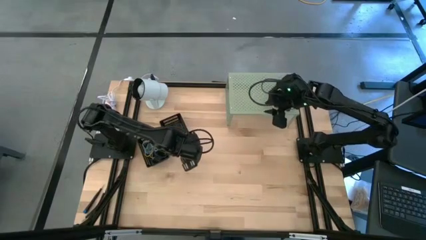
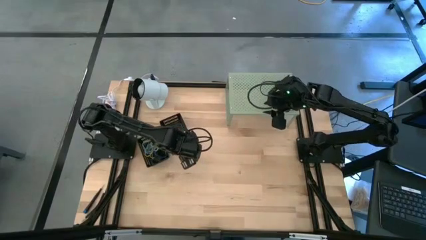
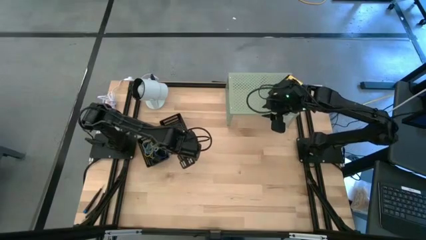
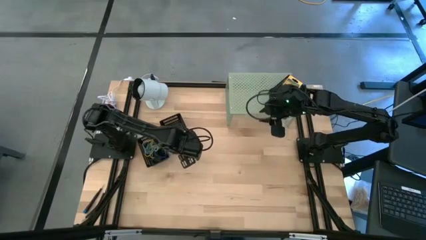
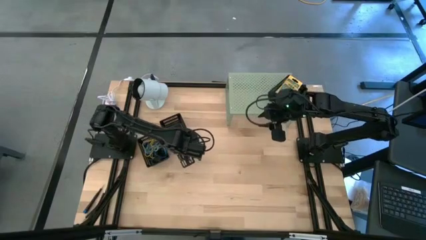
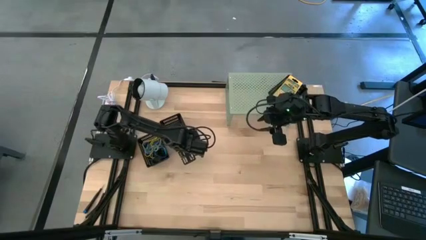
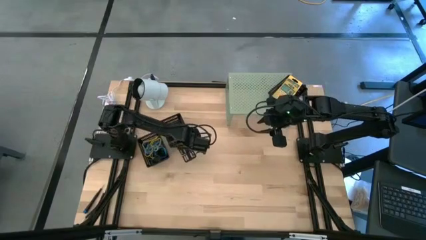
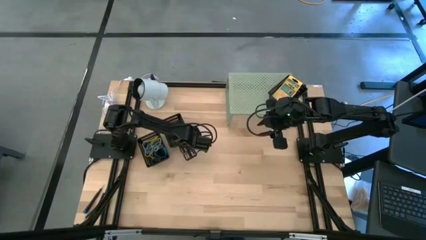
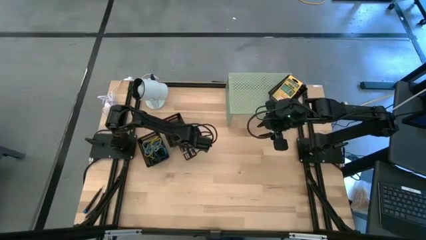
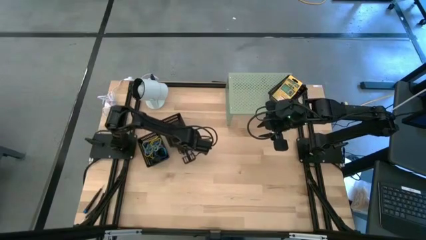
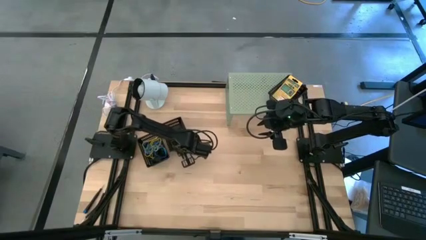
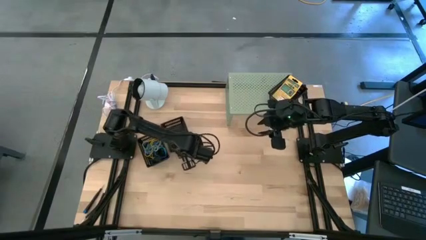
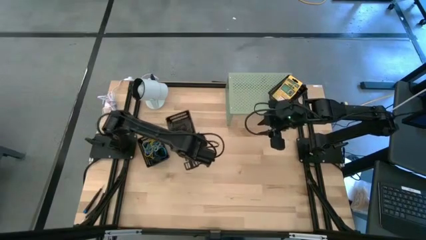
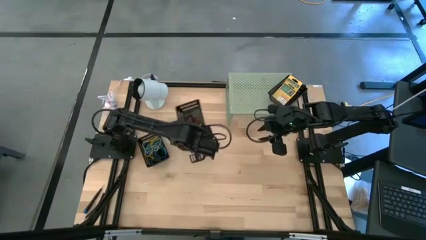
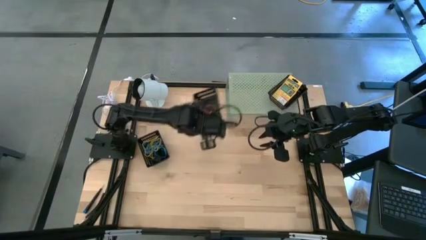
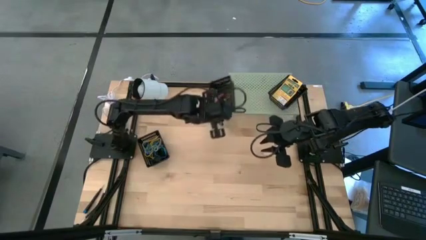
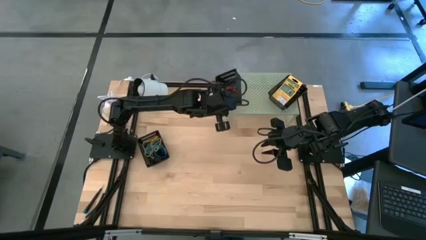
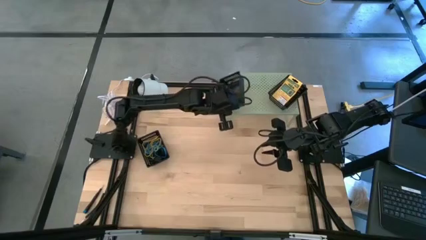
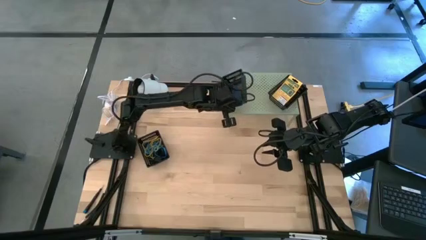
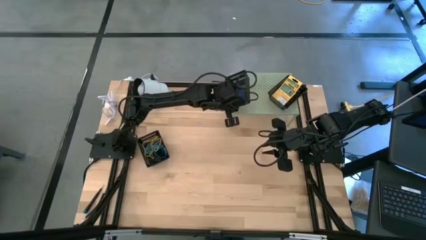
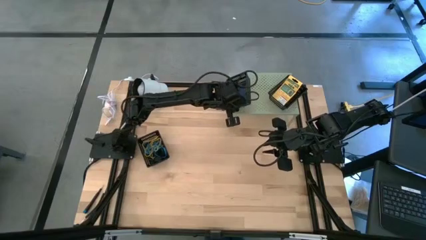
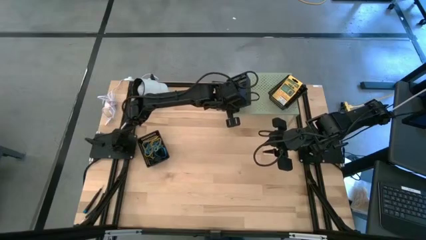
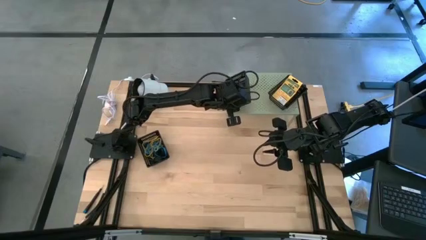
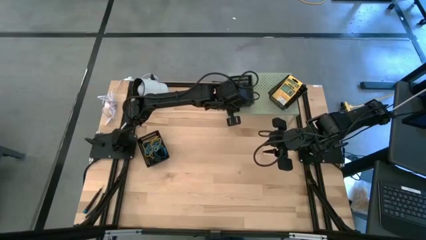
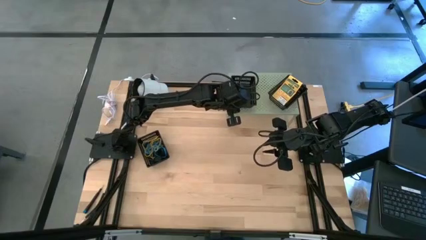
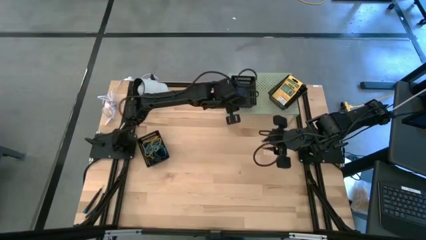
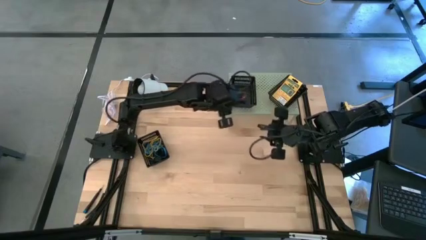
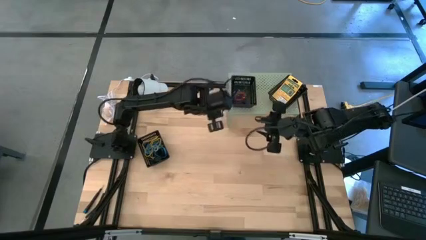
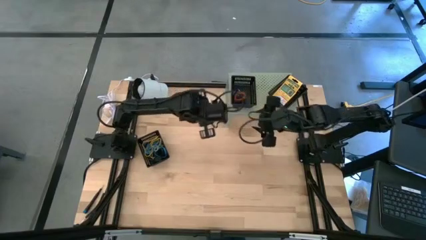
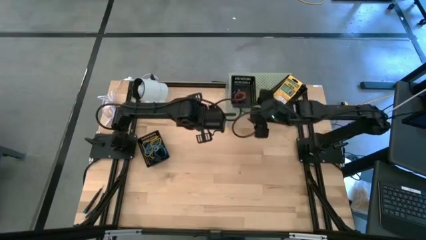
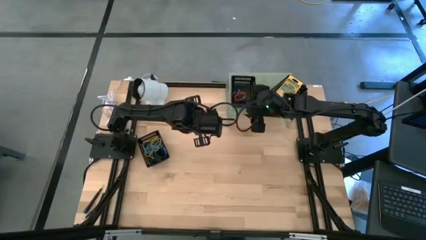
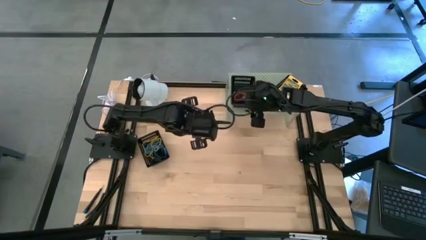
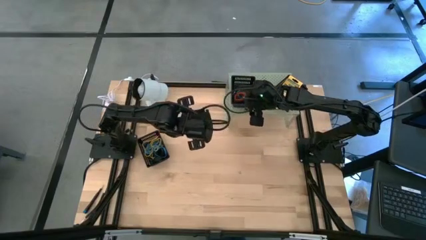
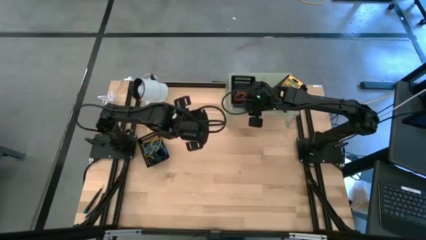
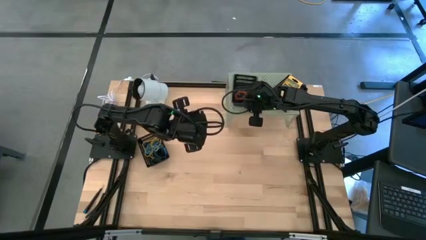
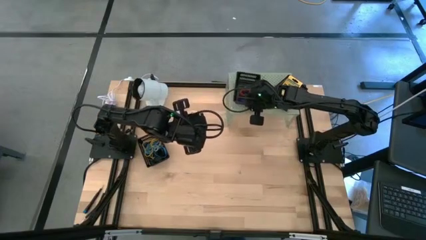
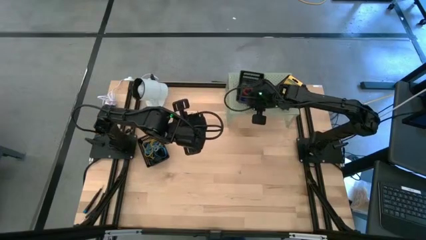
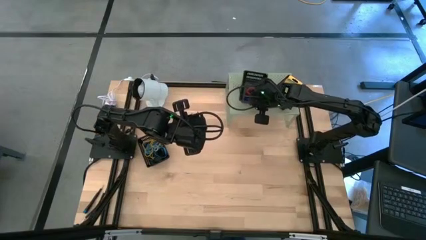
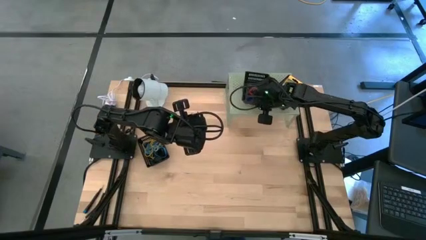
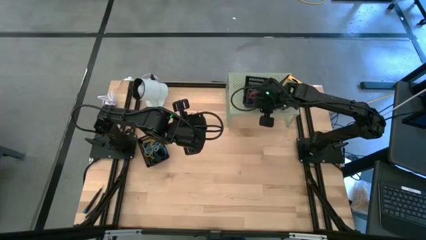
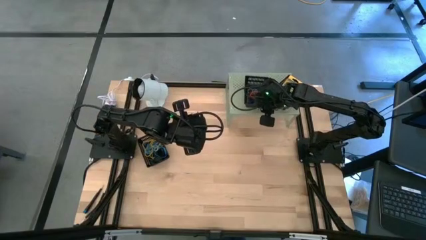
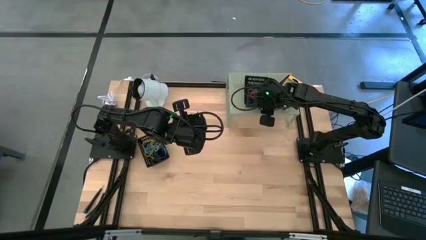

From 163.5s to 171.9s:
Task: Pick & Place Office Desk Supplies
Put the right black basket on the shelf

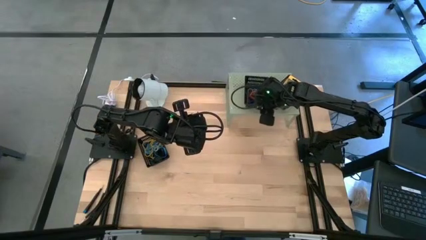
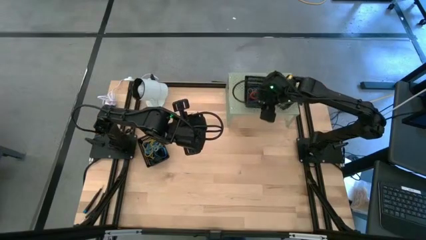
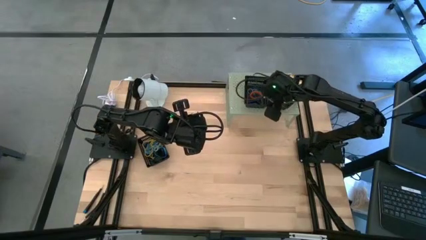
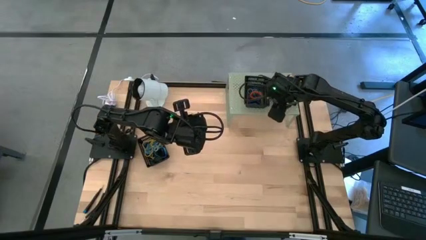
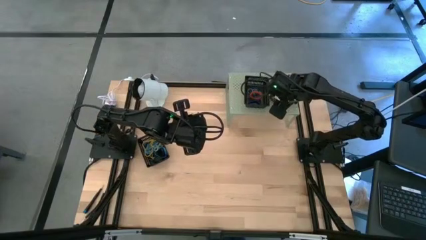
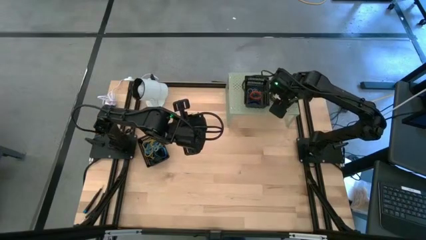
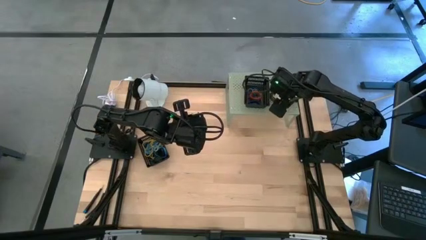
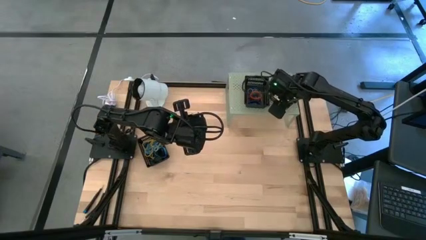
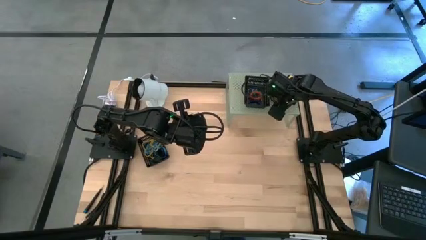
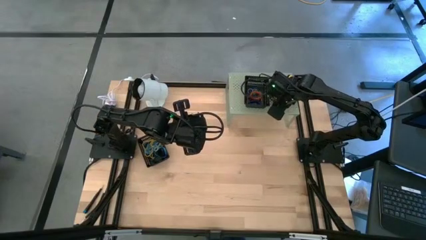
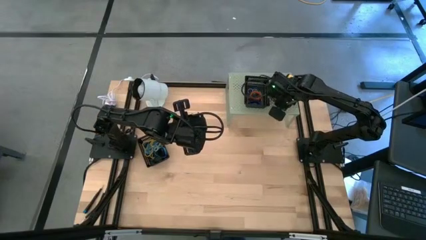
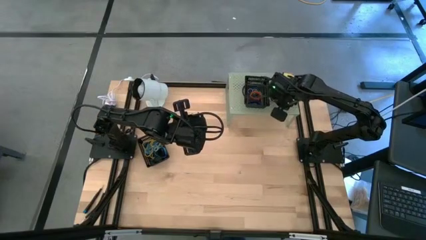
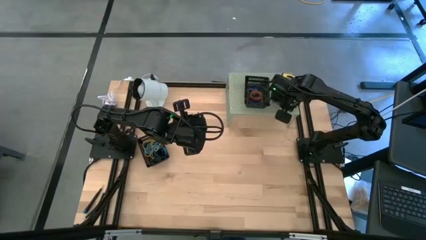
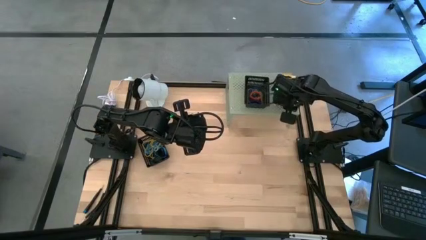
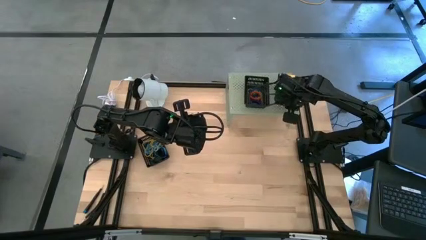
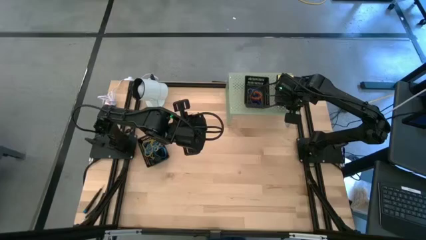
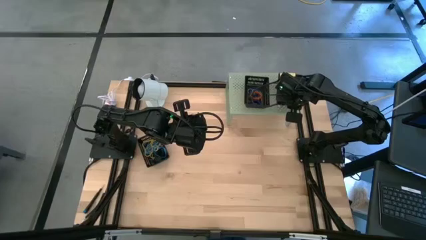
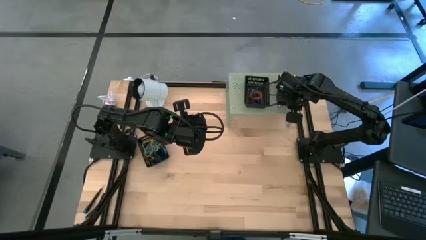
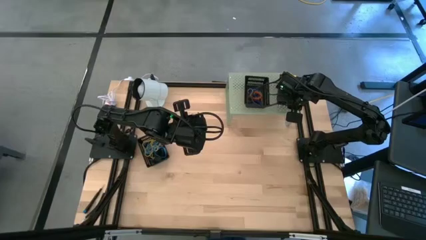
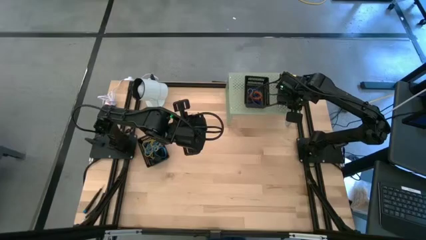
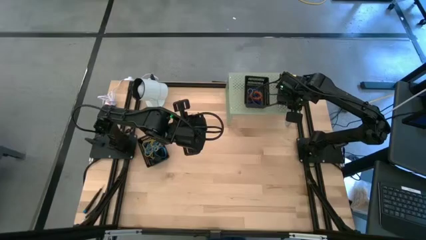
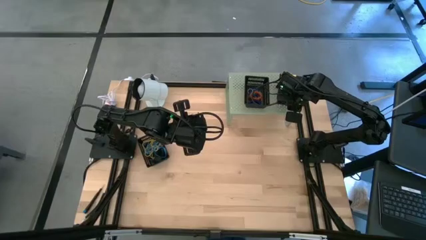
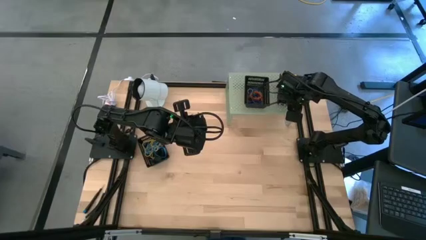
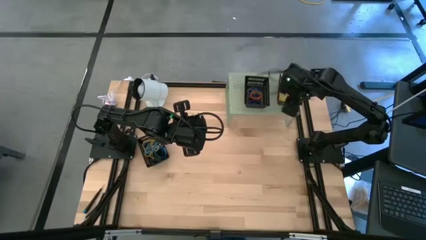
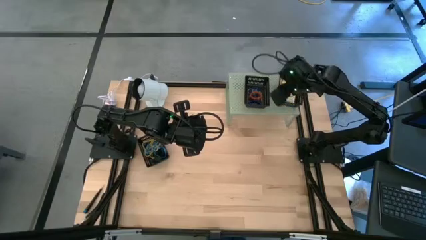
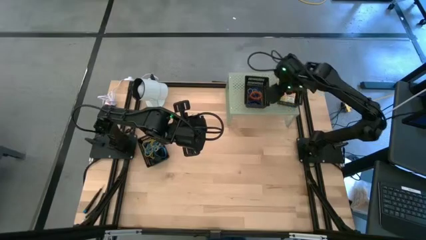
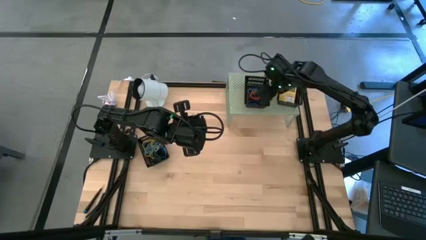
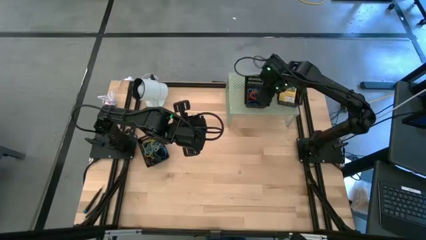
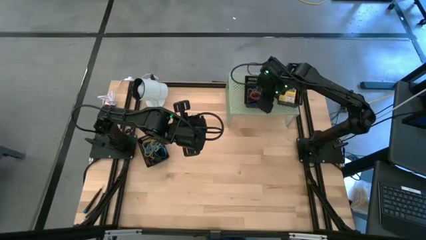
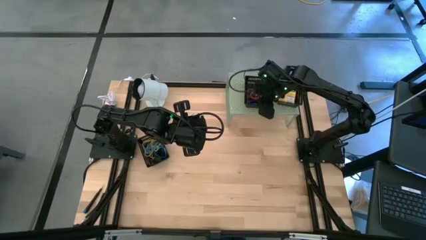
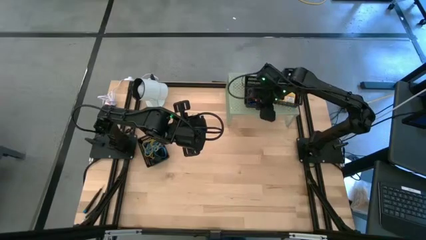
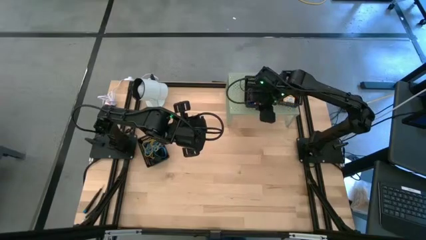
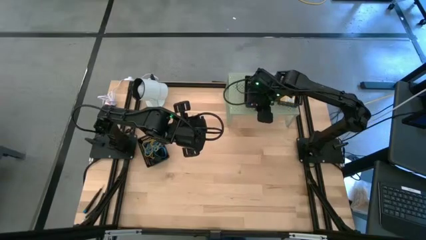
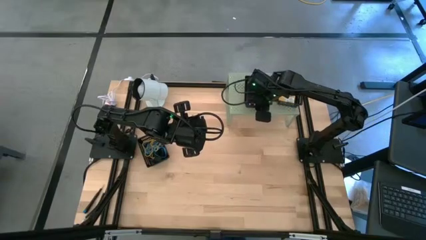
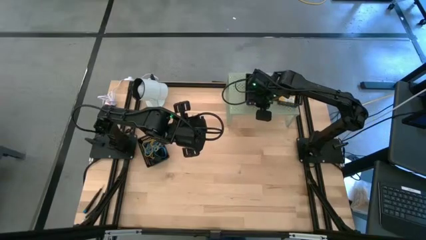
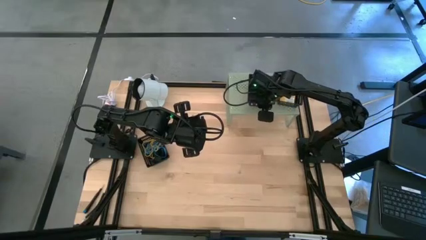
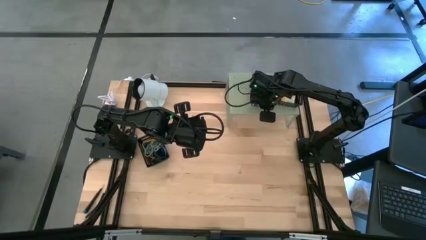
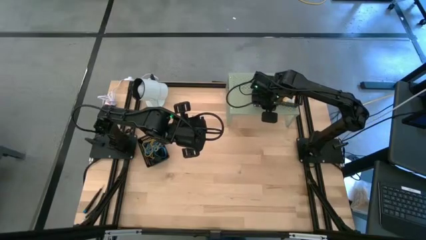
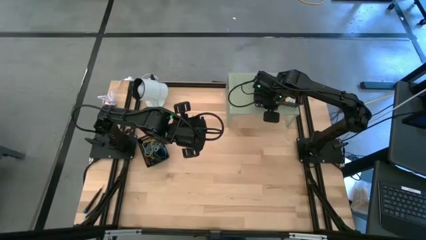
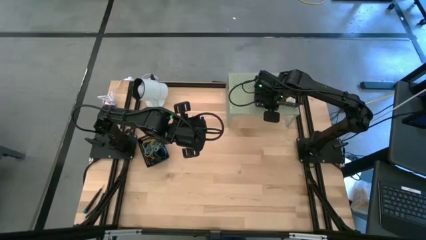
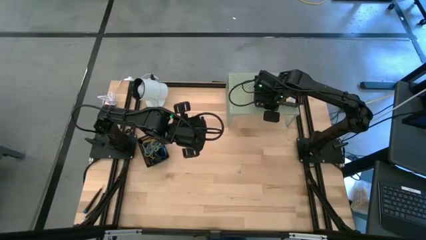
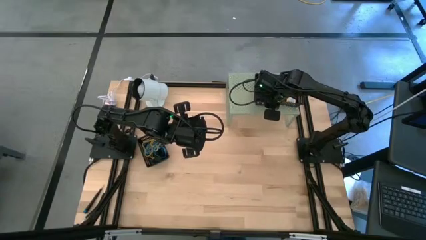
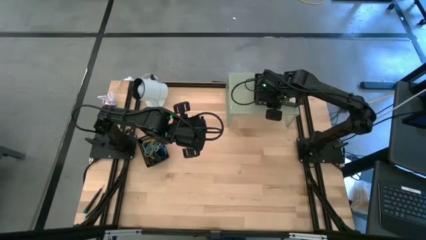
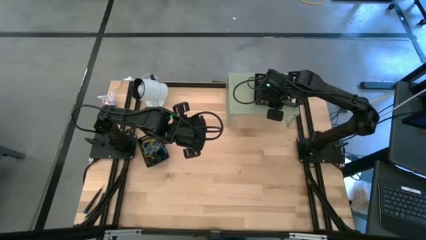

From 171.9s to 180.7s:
Adjust the baskets on the shelf
